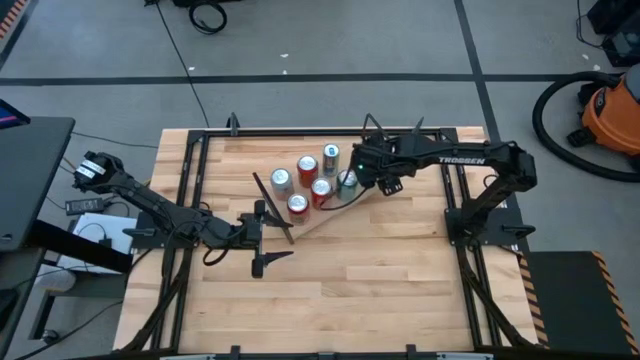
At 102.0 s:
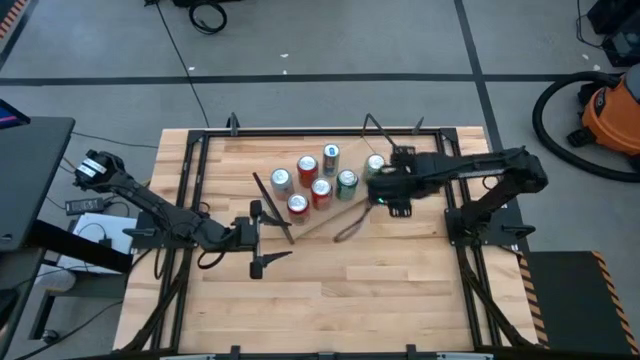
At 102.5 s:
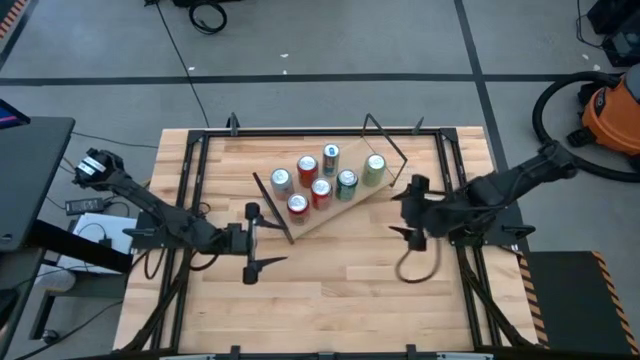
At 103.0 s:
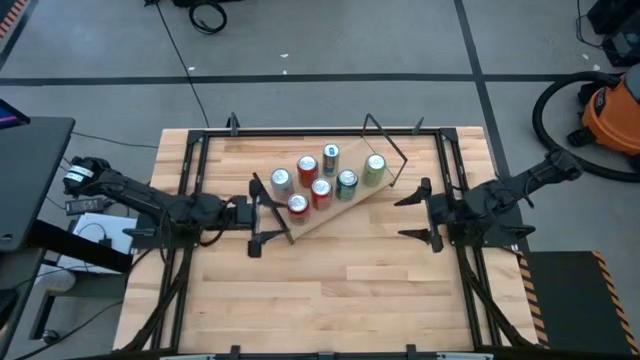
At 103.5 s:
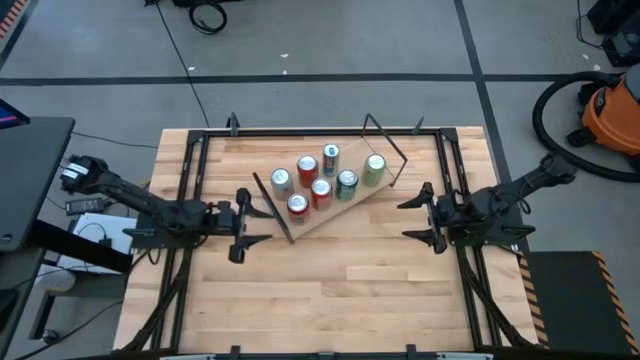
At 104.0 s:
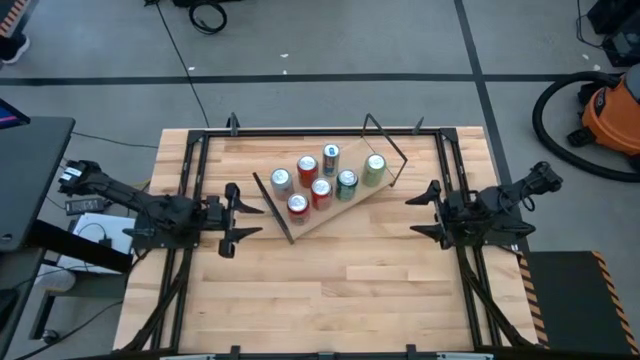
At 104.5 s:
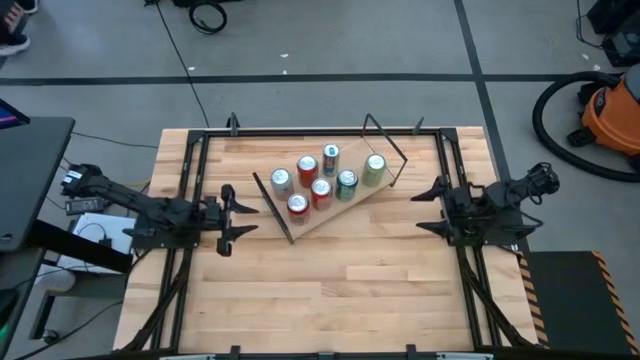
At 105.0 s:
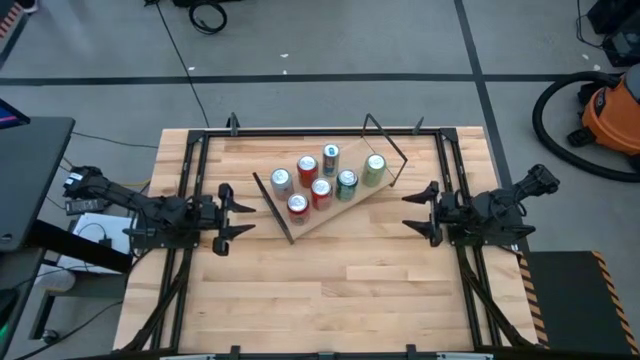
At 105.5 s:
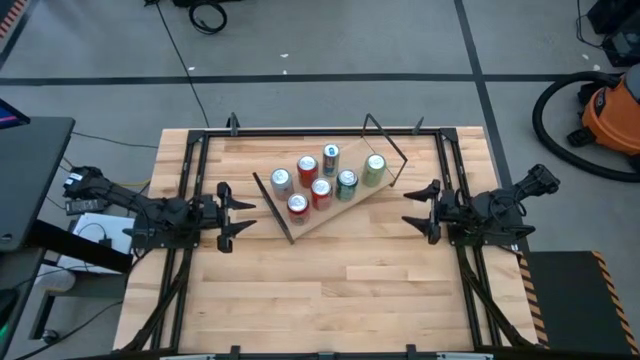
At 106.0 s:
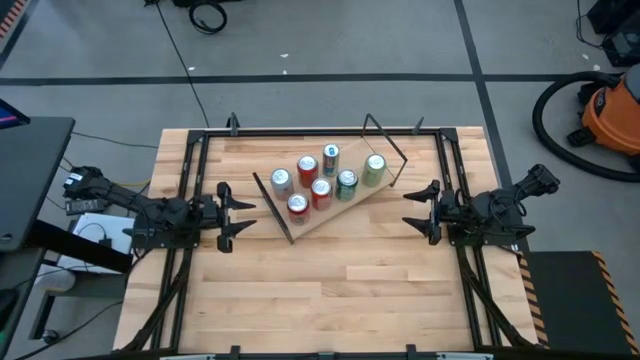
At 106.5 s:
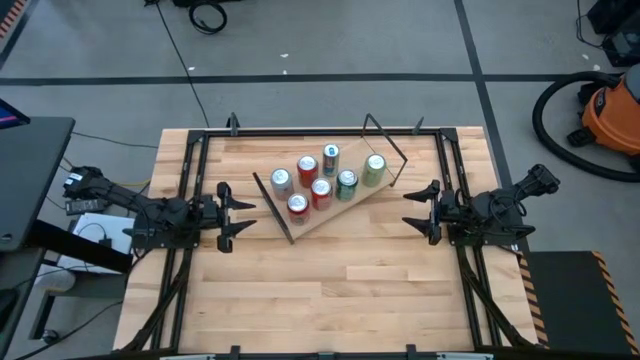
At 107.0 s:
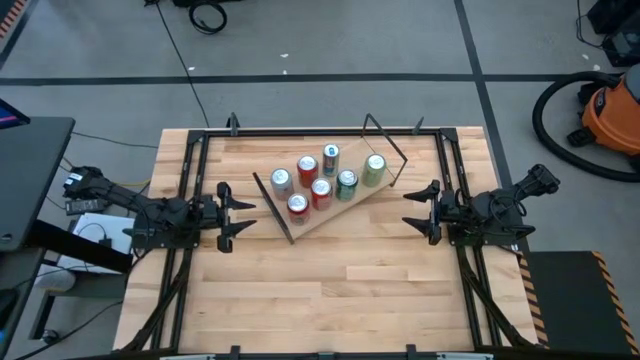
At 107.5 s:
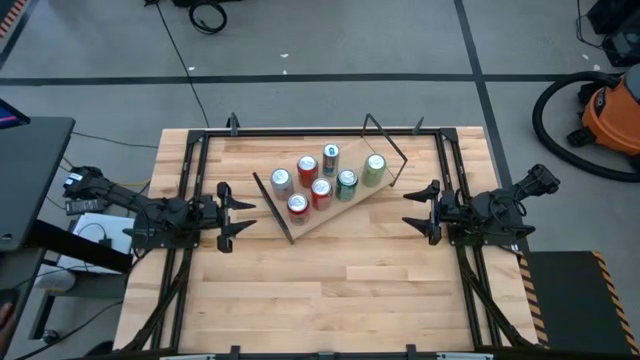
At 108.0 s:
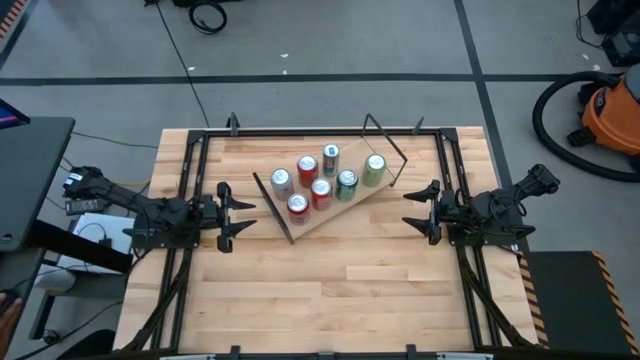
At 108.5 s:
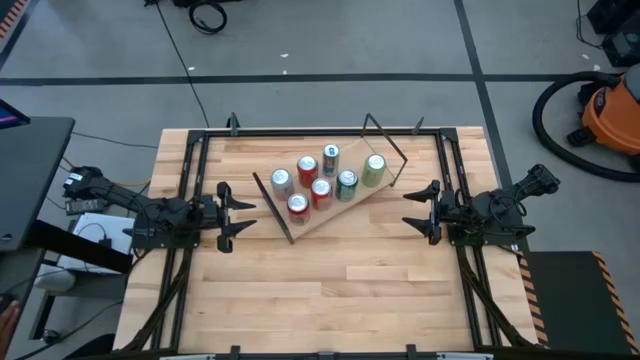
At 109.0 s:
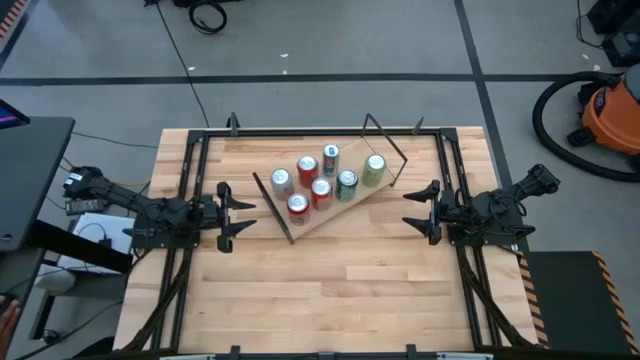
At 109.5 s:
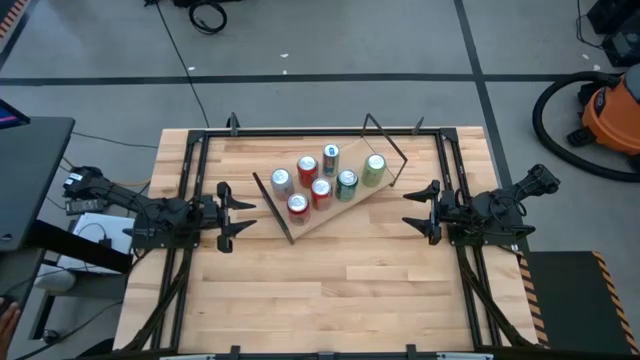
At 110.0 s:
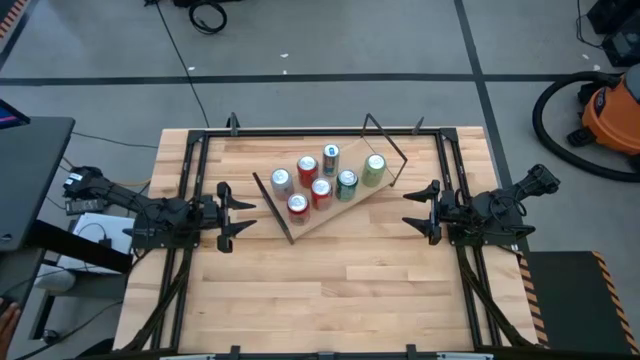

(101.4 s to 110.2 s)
Task: Place canned beverage on shelf
Return to Home Position

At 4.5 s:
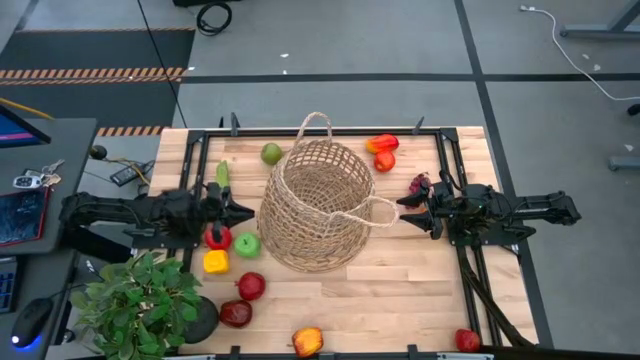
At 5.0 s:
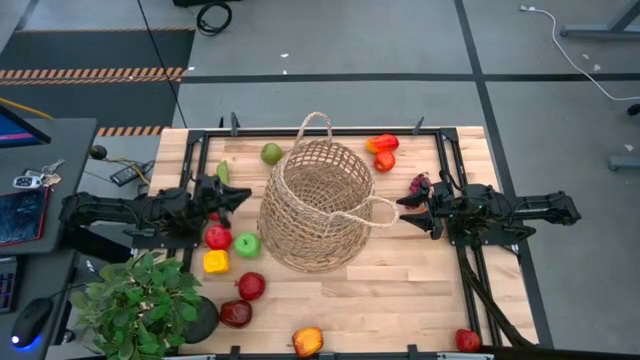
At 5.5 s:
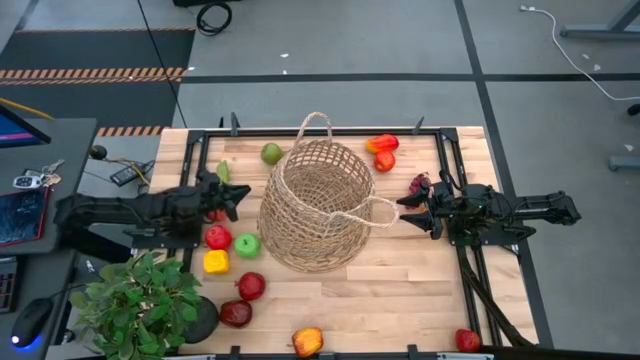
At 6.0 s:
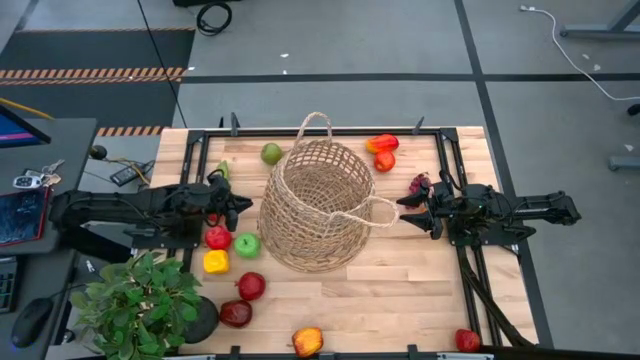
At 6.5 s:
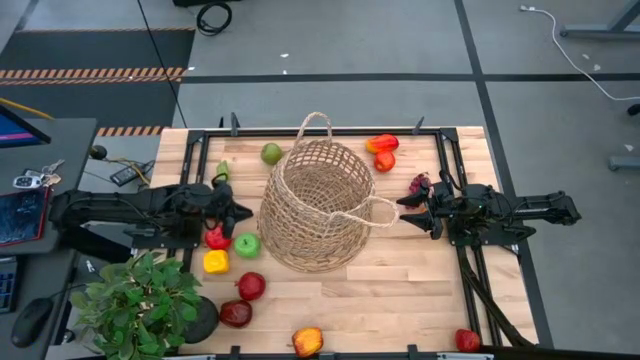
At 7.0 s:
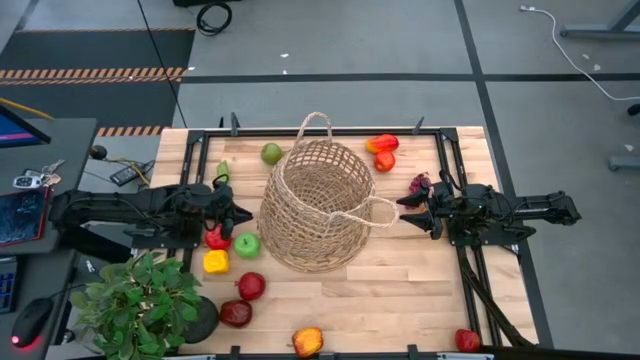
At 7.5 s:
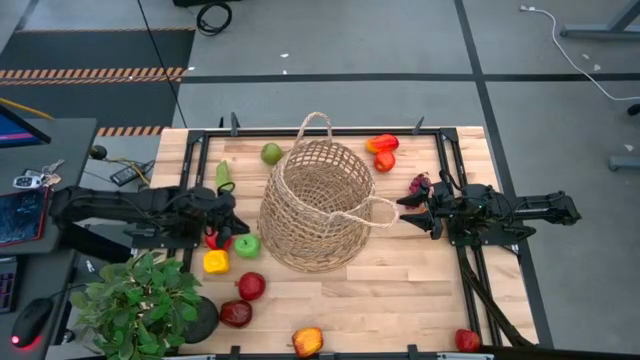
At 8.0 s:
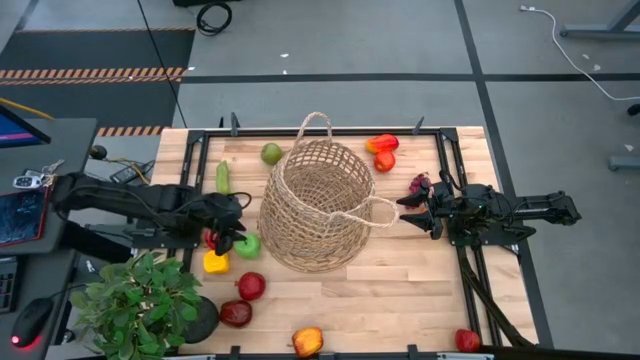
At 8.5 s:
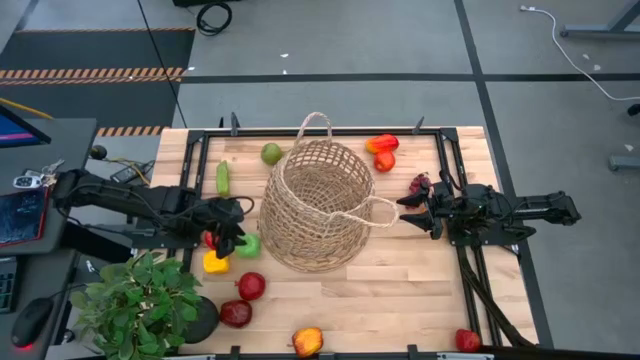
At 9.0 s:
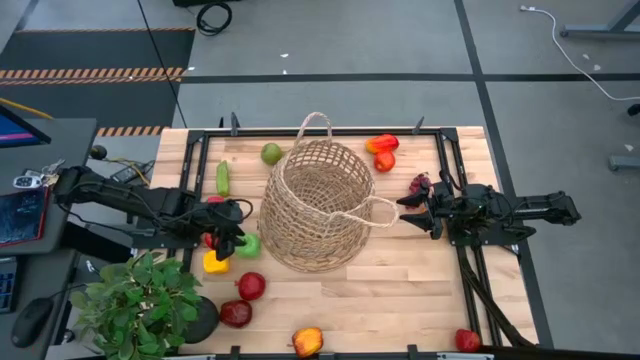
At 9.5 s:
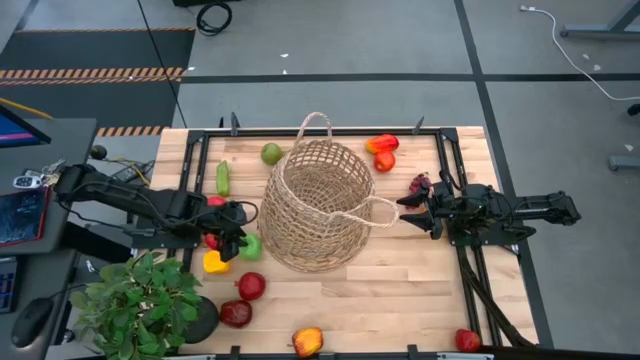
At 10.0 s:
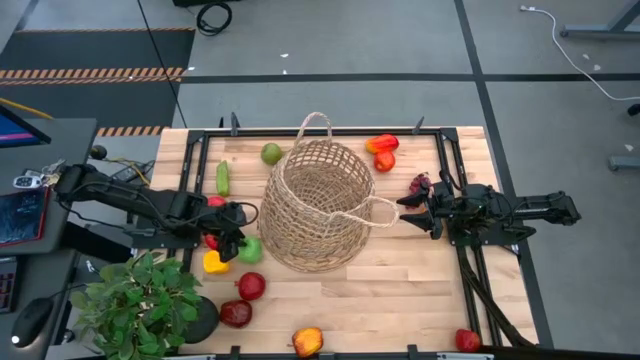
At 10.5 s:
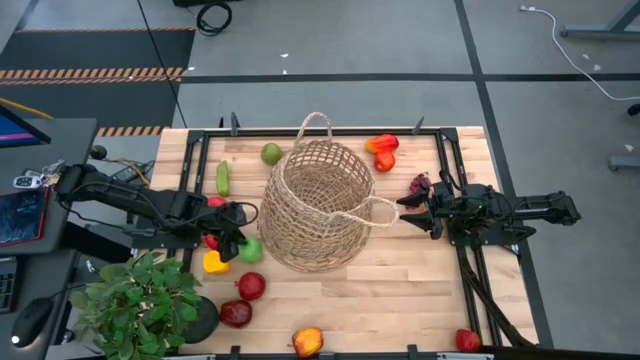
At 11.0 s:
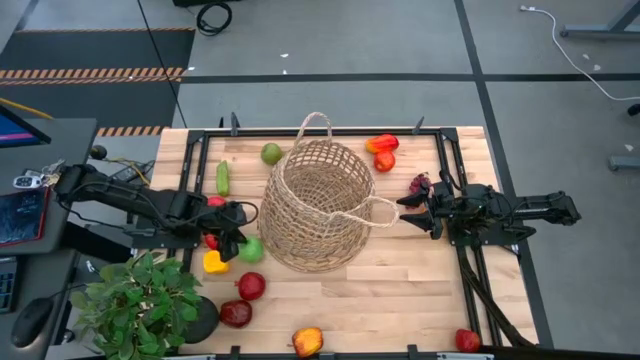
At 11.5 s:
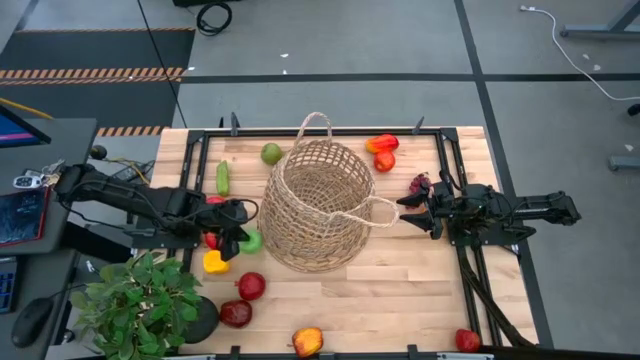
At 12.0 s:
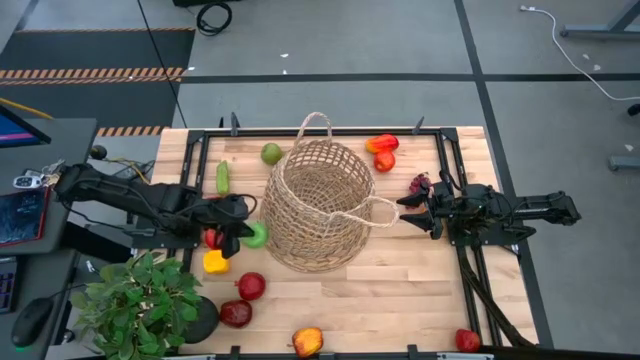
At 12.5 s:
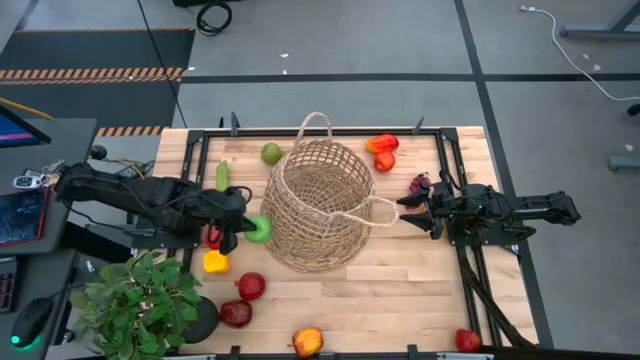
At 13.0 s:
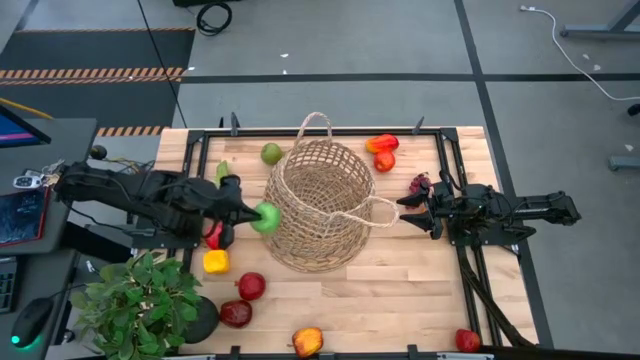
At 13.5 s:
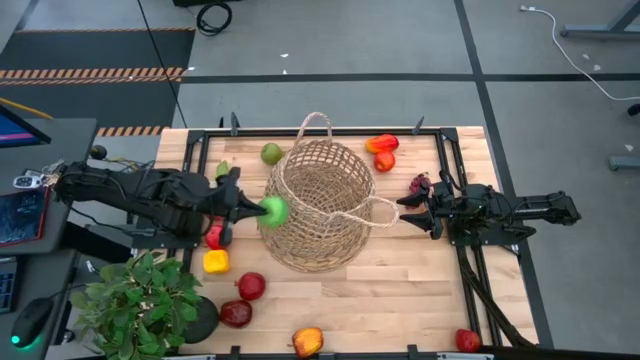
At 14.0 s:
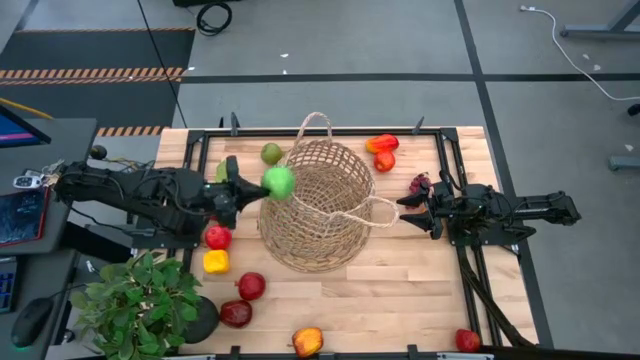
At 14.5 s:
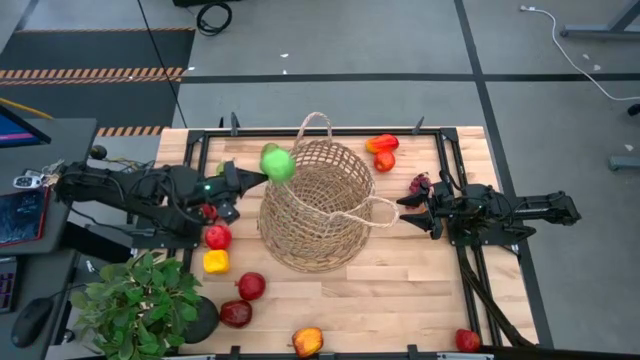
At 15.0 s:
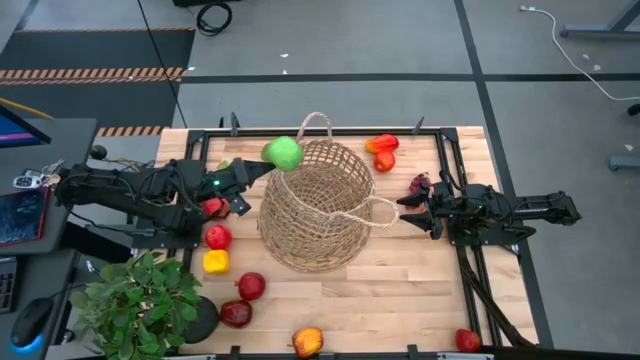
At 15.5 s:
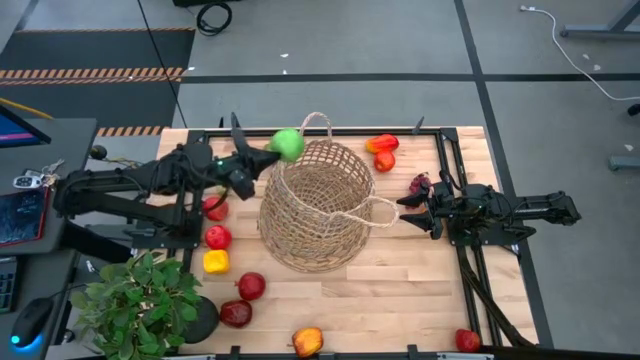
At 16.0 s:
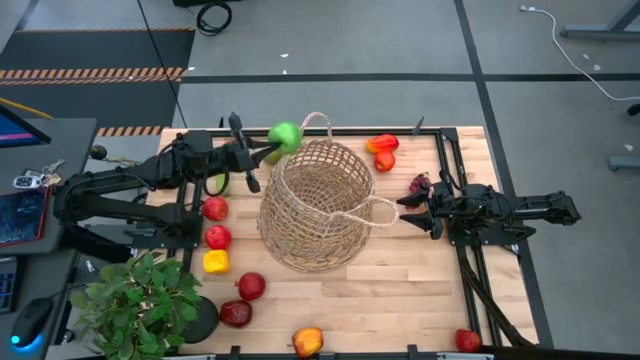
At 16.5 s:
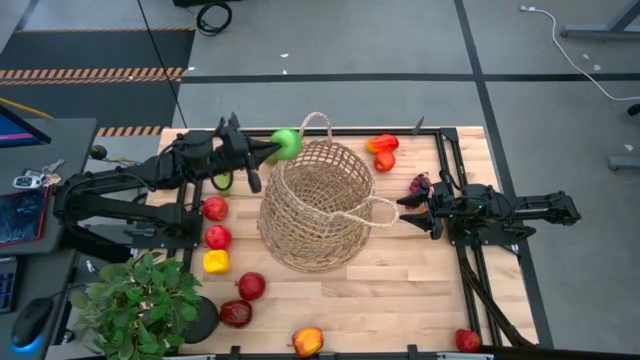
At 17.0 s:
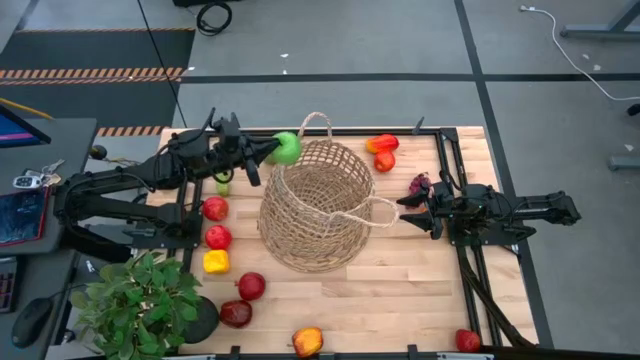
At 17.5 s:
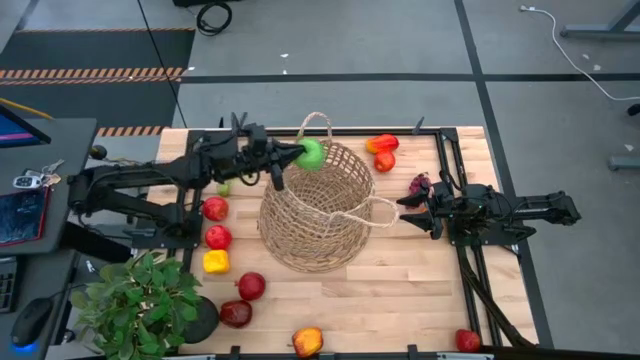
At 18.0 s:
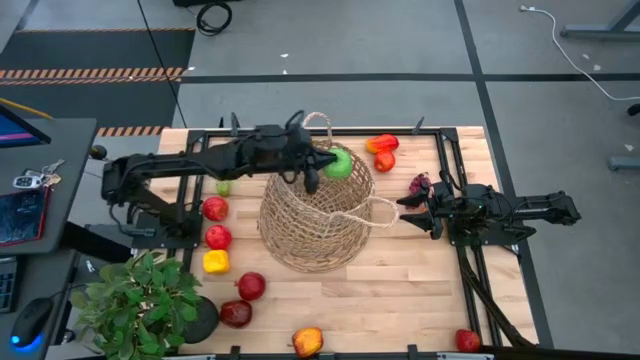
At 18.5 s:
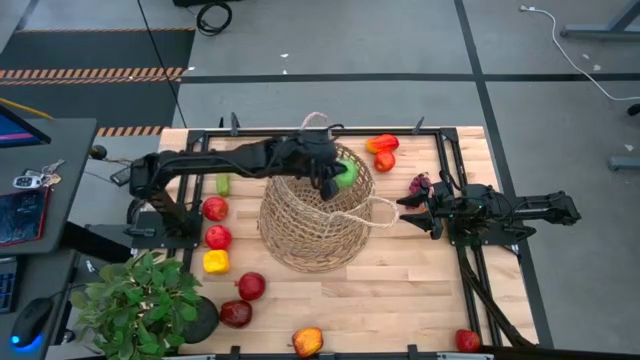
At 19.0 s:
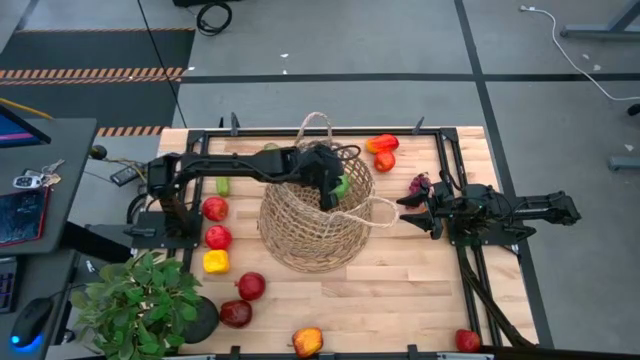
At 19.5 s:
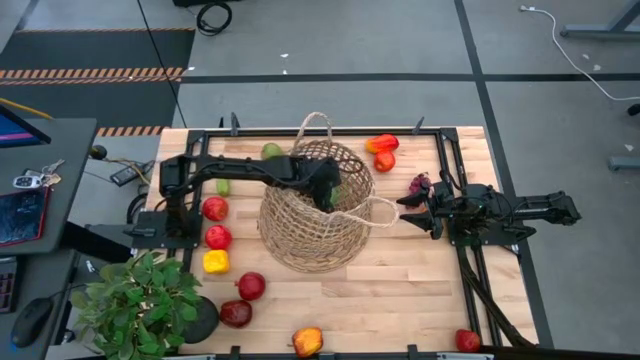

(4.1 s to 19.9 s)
Task: Build produce basket
Put the green apple into the basket
